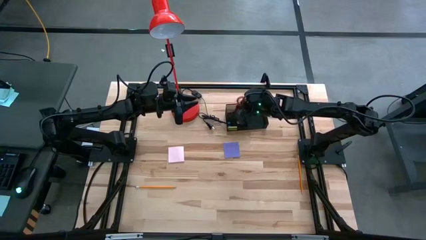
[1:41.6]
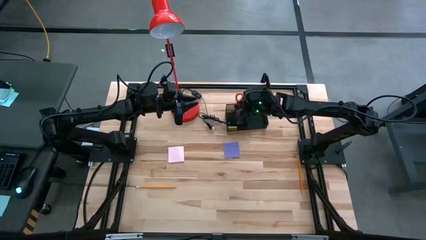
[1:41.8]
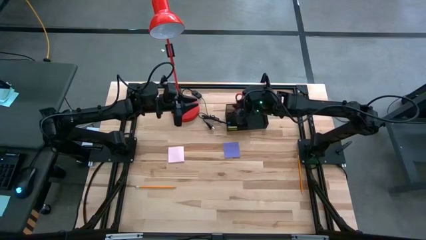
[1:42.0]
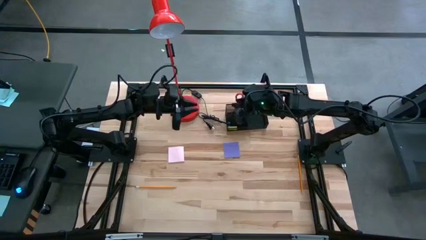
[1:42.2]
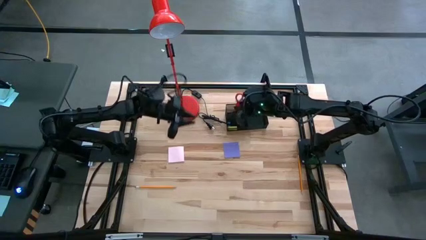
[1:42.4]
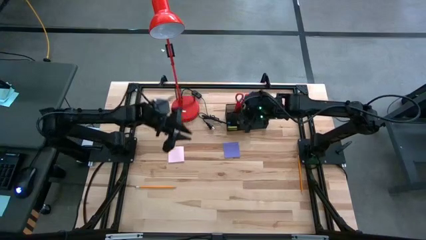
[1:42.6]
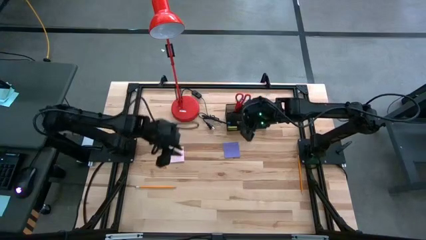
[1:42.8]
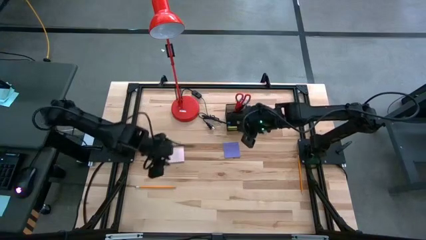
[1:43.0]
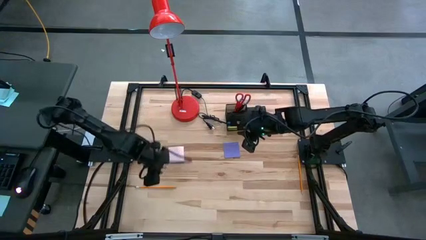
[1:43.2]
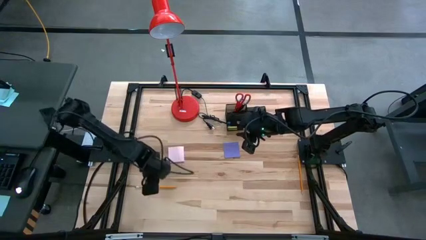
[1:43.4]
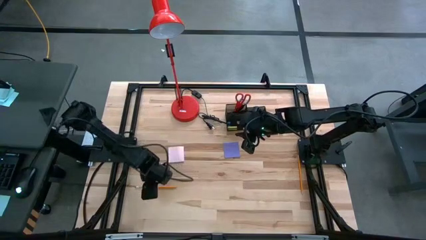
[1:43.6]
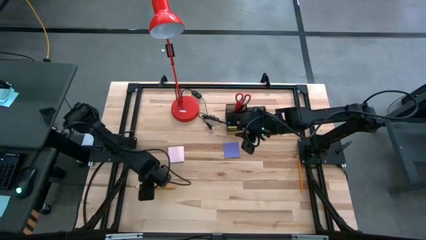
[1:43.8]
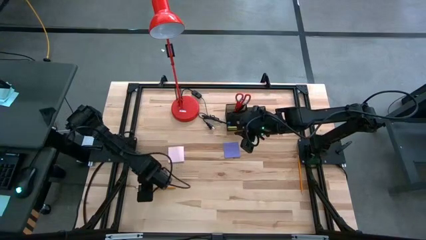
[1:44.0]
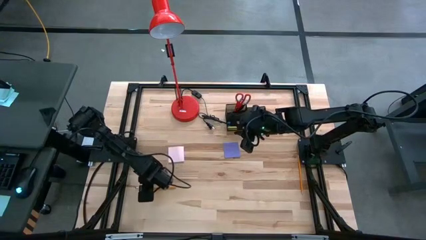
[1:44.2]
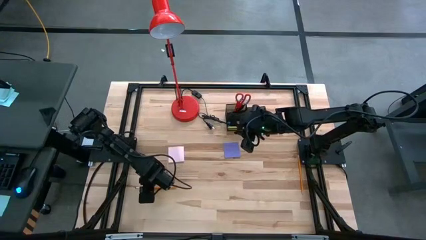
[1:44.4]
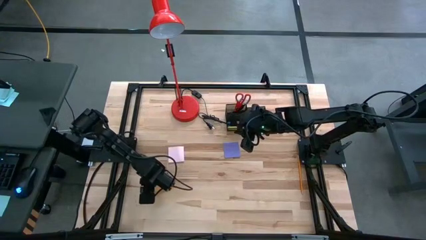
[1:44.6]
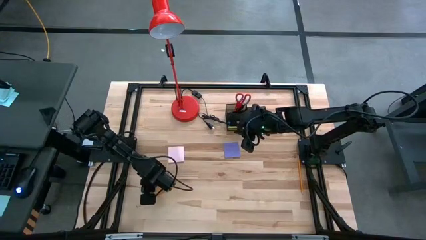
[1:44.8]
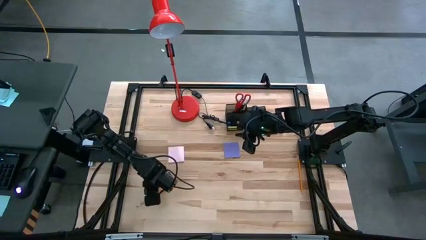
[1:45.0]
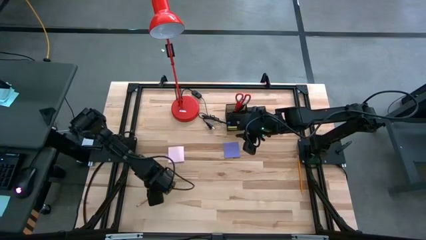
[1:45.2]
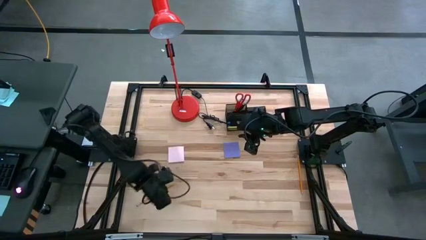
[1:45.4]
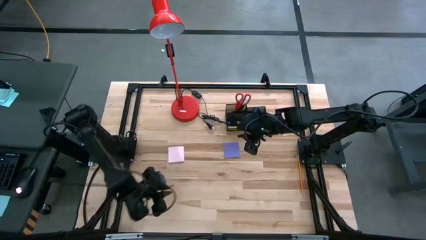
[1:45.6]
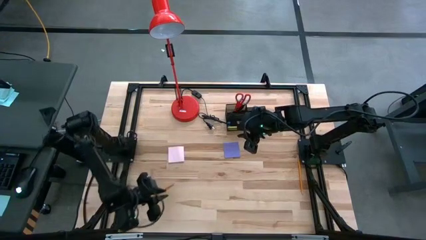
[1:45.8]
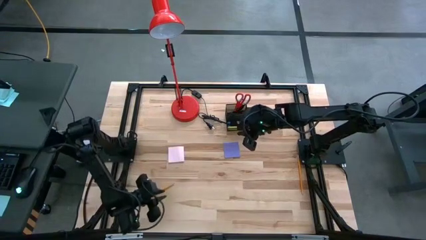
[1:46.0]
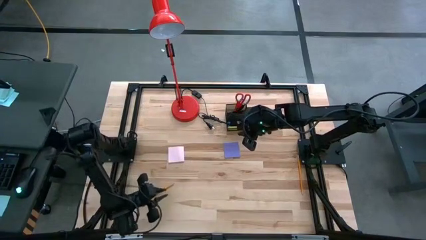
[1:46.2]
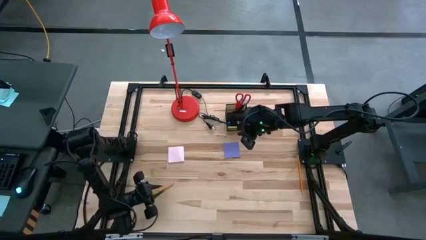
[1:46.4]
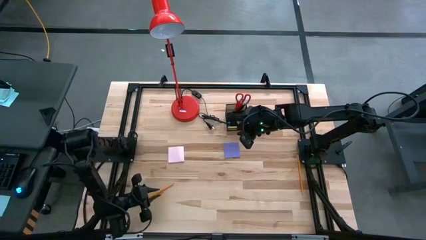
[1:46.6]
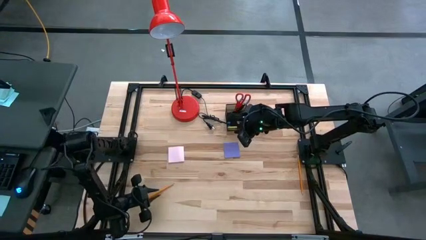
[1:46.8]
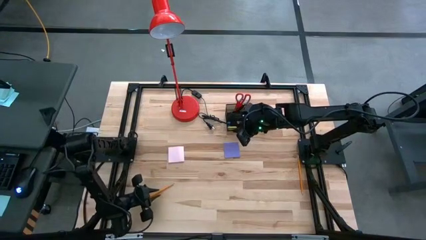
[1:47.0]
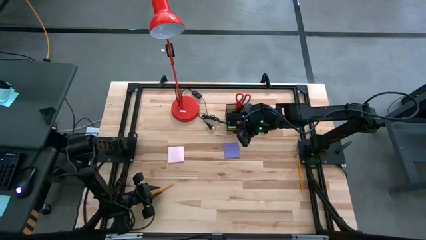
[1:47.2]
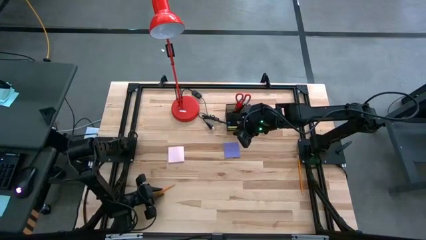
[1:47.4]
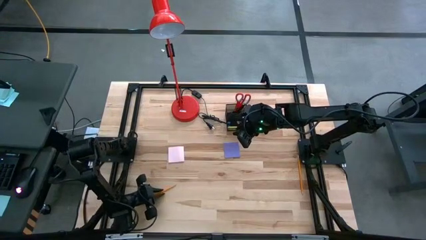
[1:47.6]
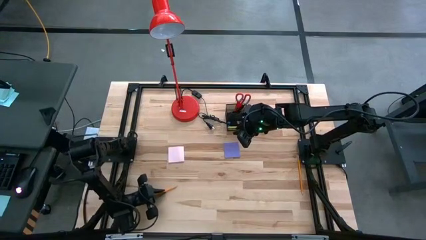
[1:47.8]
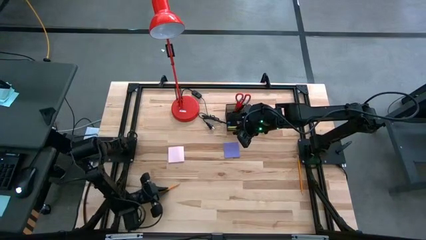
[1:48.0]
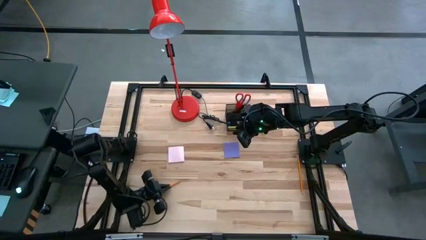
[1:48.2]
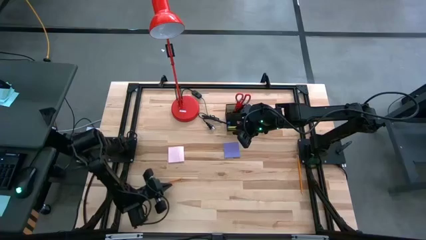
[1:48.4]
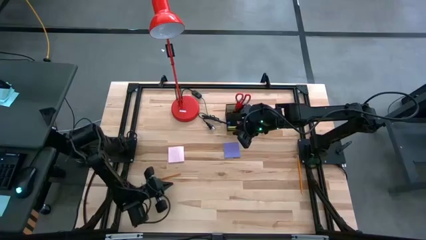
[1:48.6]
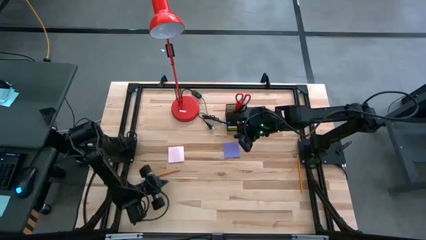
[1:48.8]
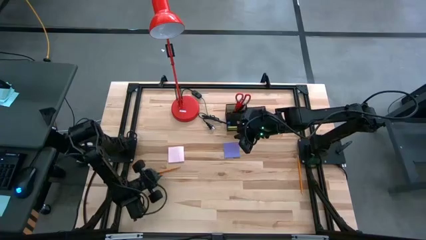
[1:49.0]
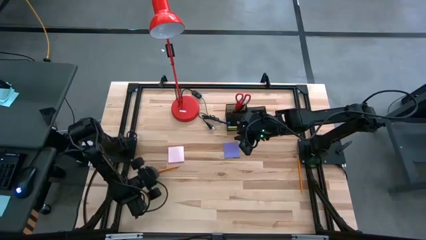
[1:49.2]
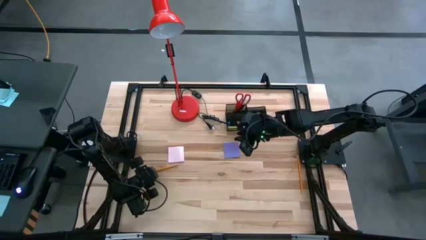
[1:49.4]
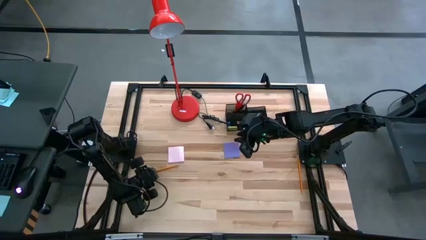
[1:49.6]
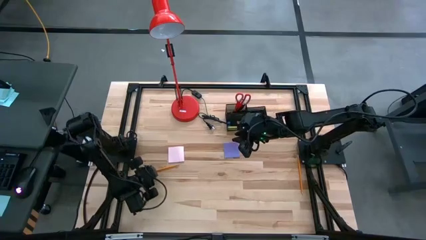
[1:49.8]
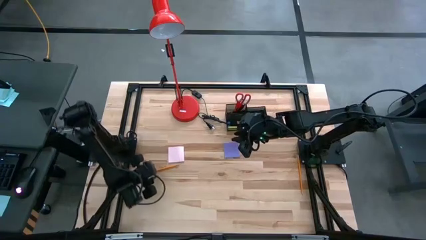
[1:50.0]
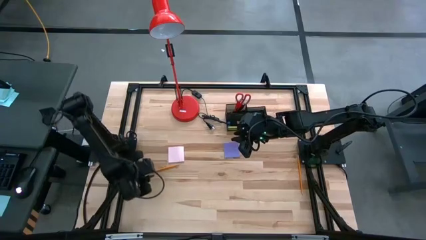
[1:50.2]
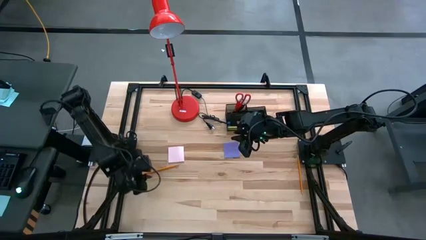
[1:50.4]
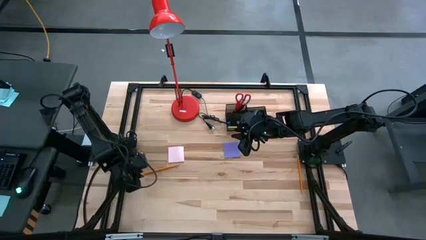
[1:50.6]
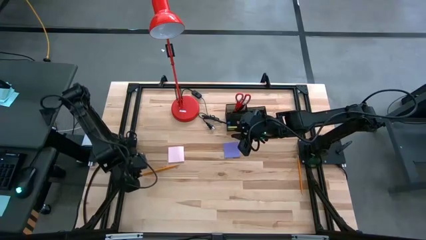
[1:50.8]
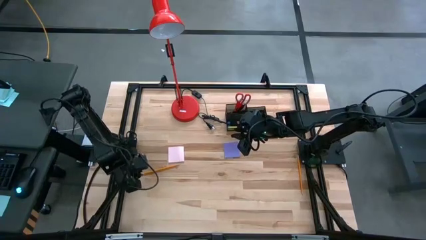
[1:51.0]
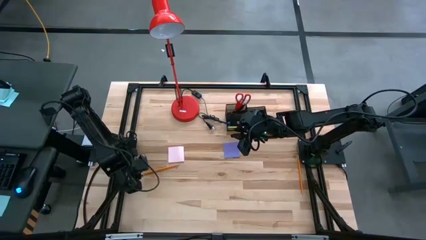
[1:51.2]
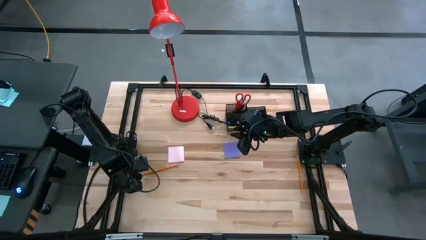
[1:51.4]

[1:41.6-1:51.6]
Task: Pick and place office supplies into organizer
Put the left orange pencil into the black desk organizer
